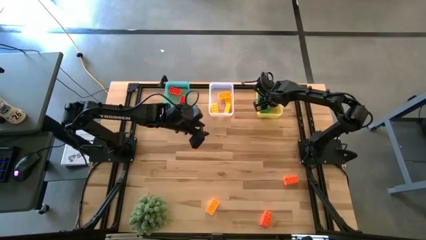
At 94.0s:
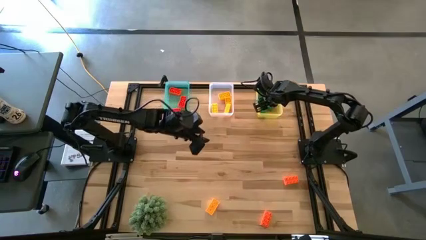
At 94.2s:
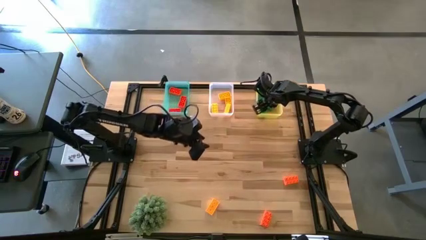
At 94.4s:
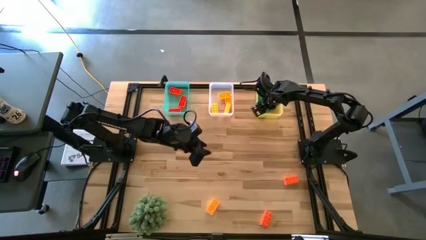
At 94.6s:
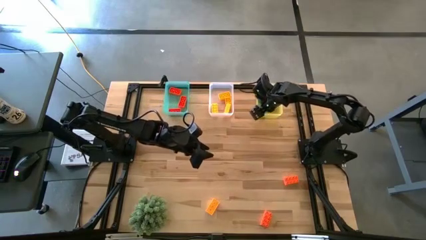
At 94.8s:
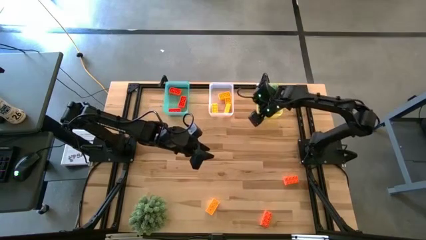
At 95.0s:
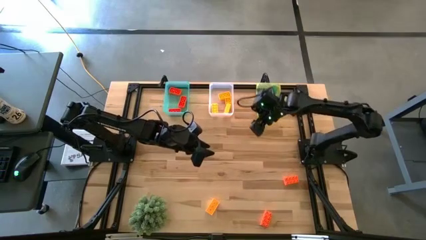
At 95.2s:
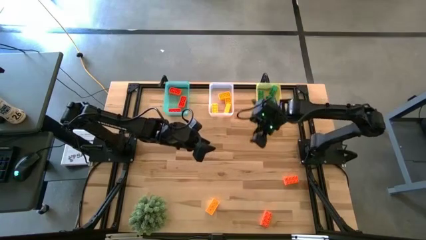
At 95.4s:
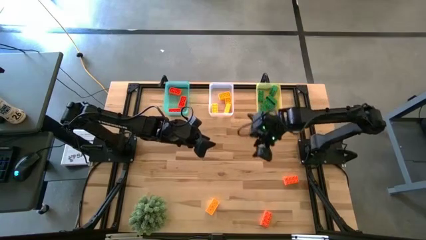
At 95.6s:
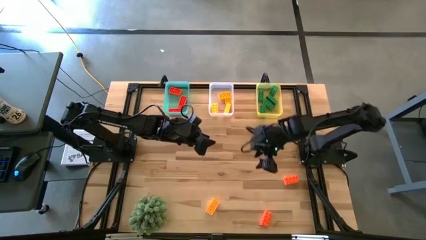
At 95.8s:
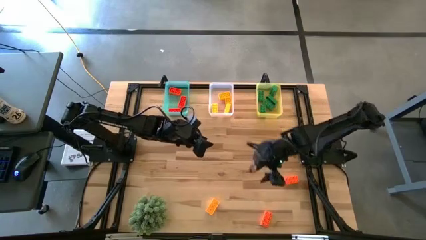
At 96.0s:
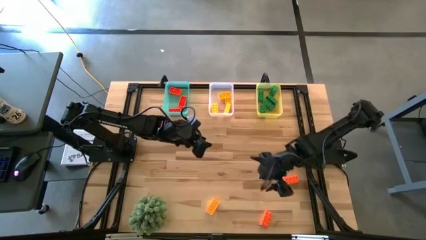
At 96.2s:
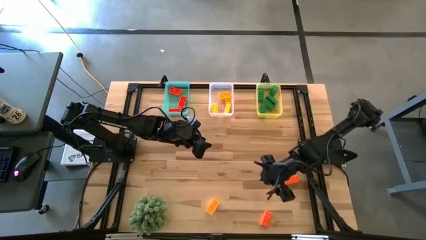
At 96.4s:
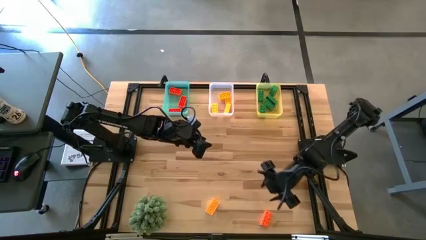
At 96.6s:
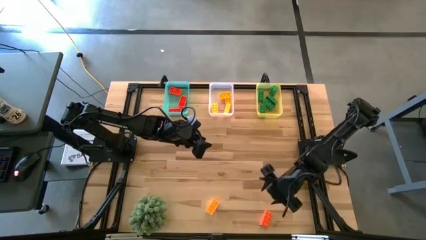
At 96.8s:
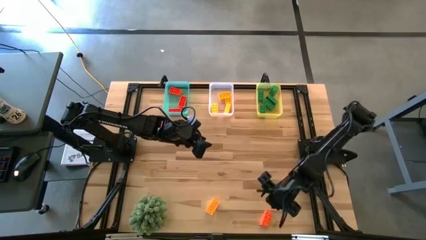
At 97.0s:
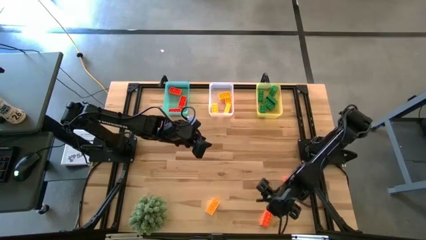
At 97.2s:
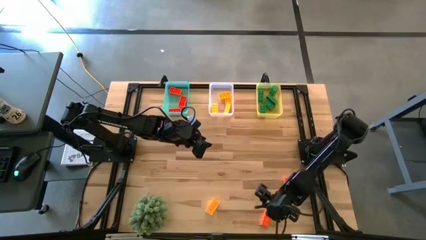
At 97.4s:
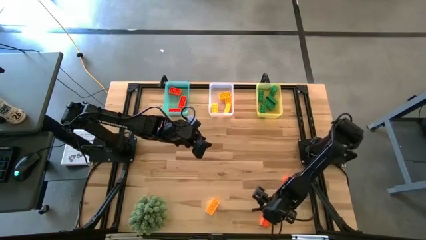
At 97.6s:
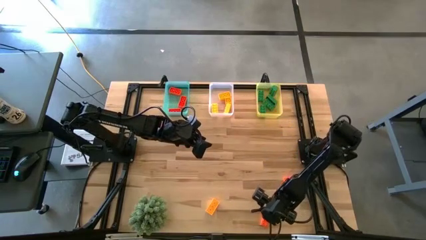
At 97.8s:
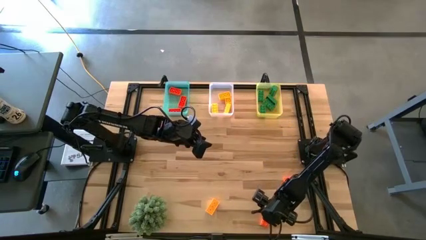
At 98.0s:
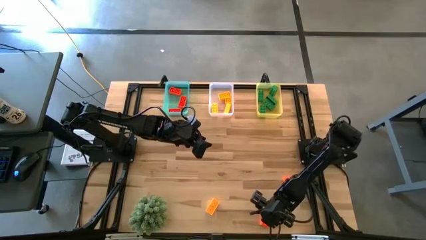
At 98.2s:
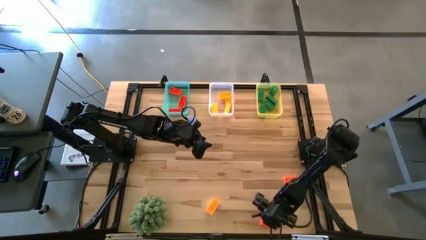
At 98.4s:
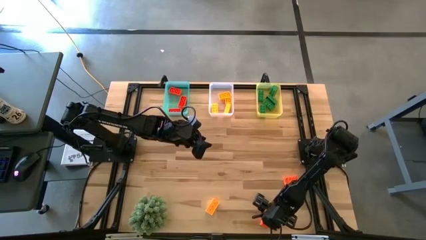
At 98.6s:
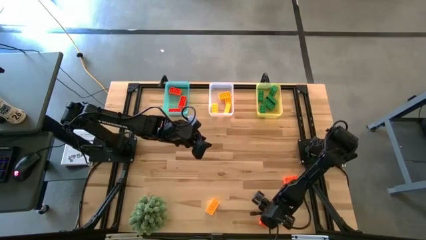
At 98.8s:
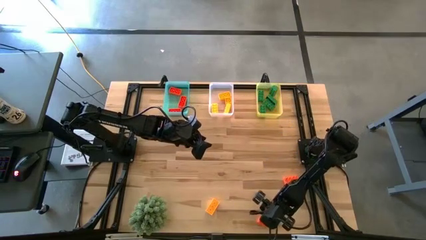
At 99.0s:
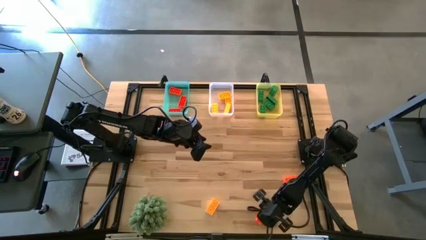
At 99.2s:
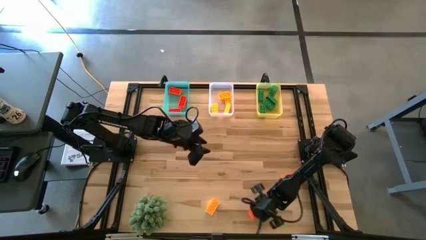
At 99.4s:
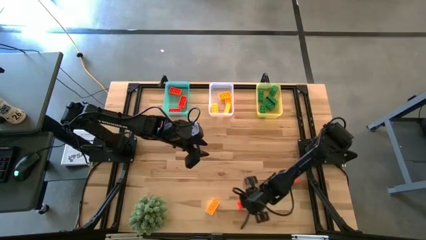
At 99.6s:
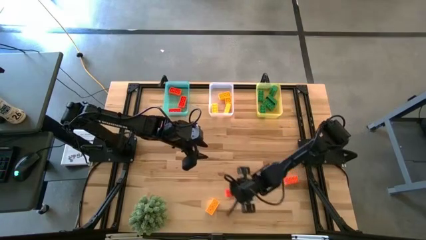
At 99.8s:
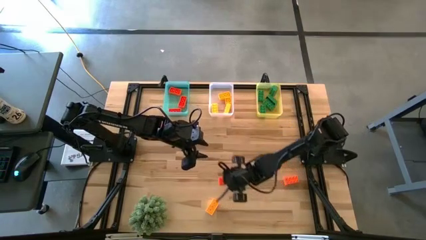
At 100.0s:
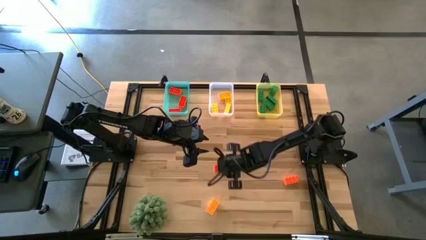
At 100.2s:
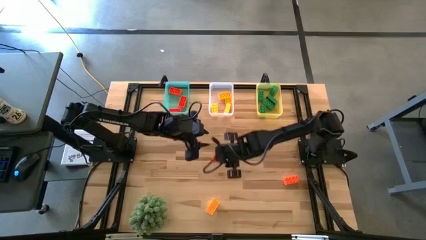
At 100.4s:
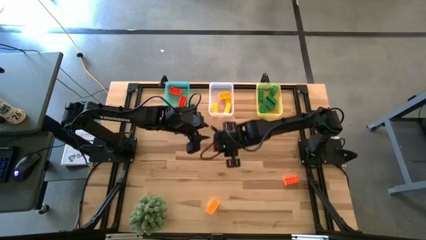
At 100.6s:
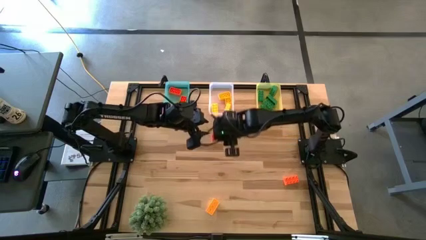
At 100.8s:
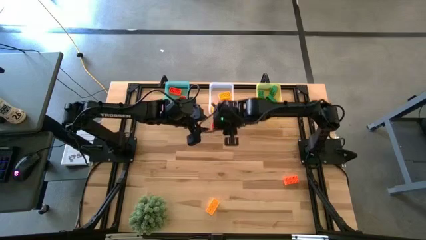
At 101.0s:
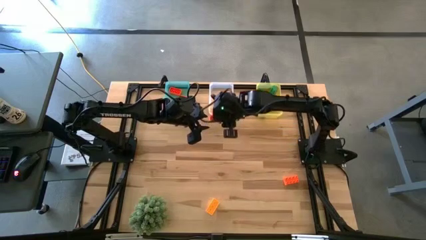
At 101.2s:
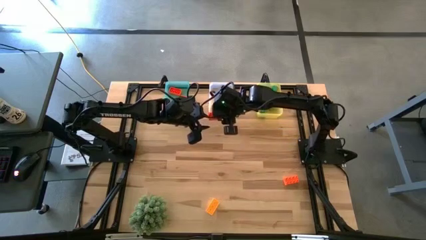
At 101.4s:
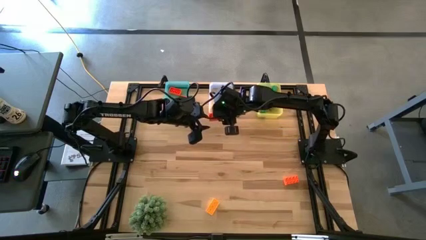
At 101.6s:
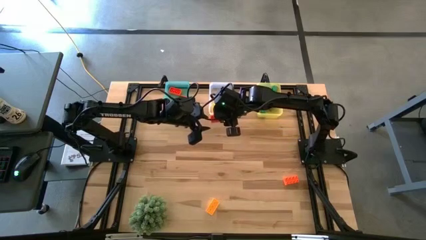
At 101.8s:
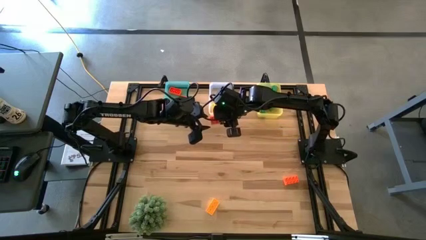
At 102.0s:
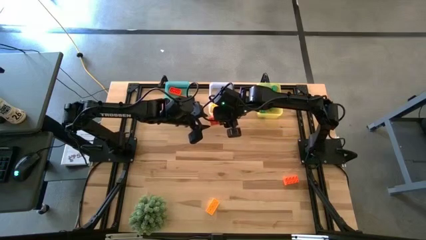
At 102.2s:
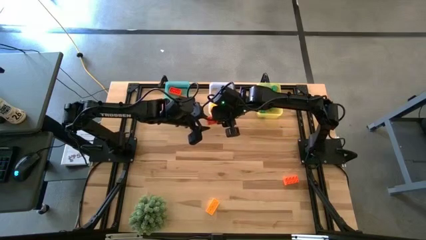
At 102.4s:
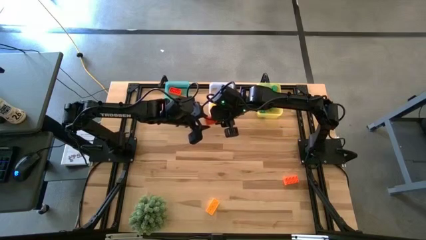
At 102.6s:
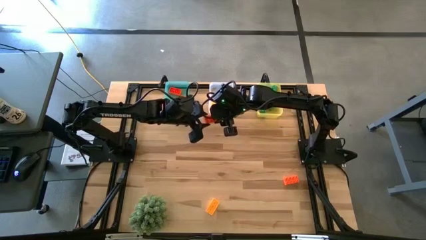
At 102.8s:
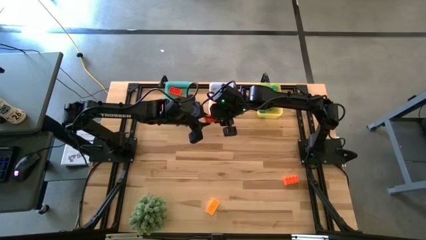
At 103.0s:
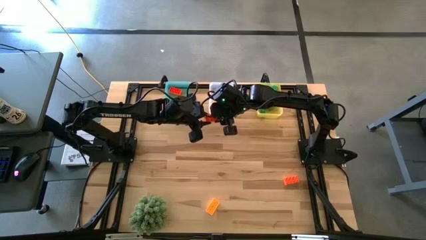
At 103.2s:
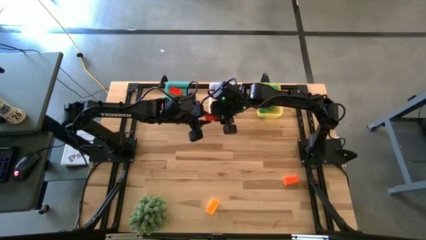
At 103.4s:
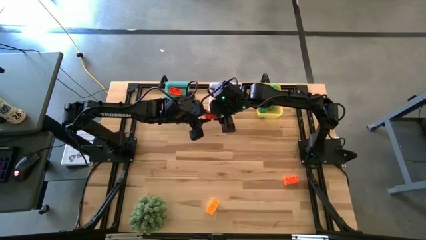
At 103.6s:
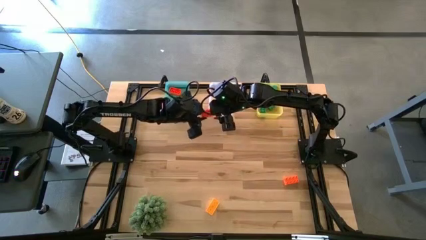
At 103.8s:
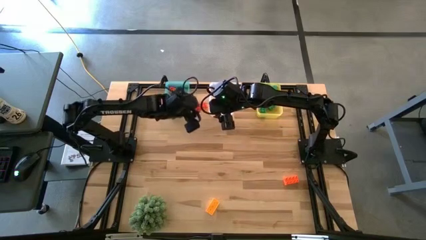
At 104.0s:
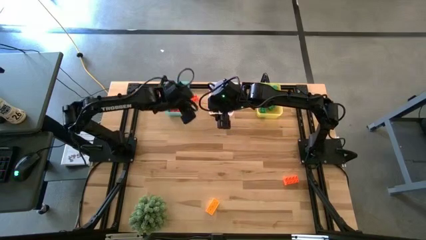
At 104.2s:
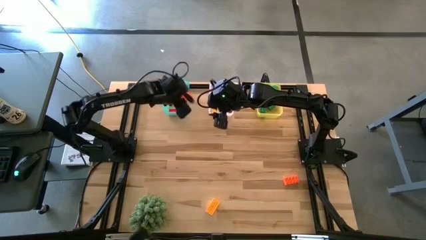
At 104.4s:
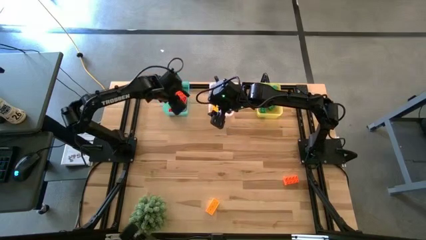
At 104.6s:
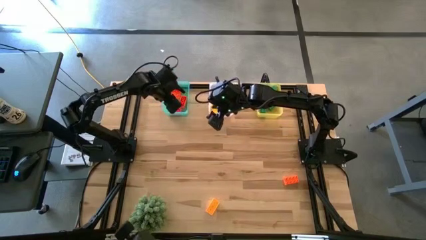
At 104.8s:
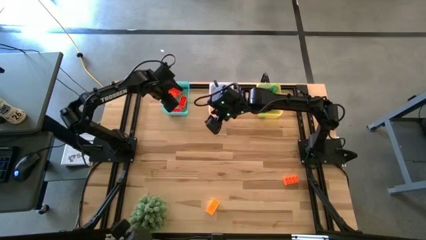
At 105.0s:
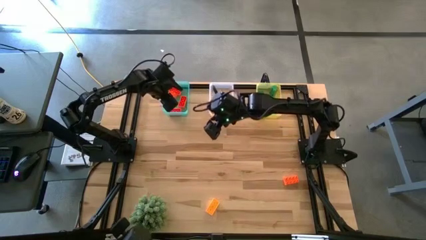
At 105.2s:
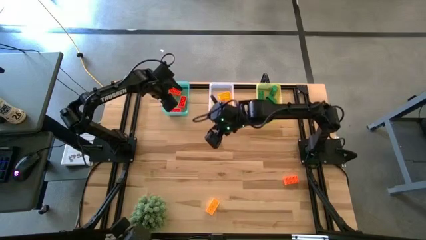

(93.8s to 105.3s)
Task: Sort & place blocks by color
Put the orange game piece into the blue bin

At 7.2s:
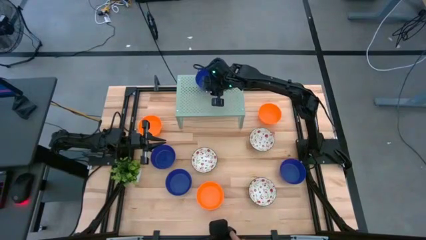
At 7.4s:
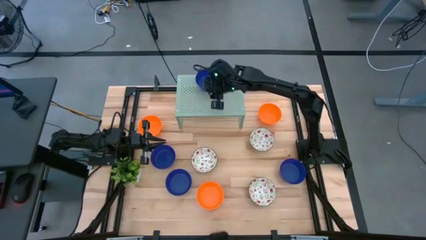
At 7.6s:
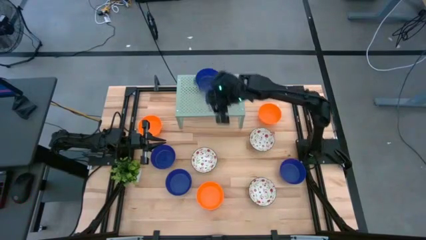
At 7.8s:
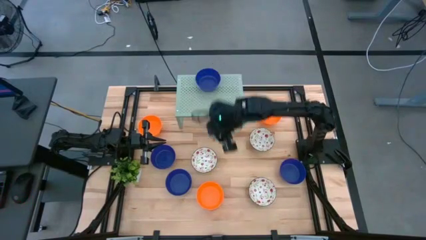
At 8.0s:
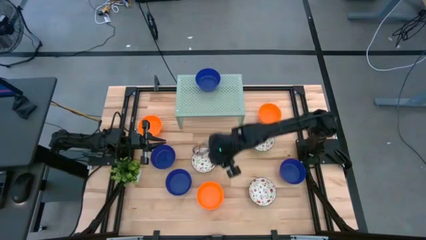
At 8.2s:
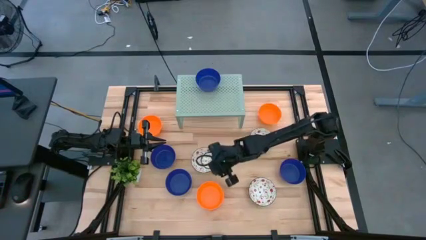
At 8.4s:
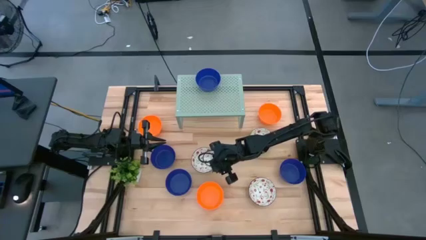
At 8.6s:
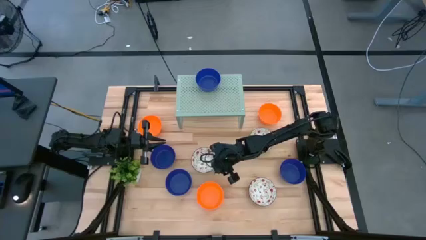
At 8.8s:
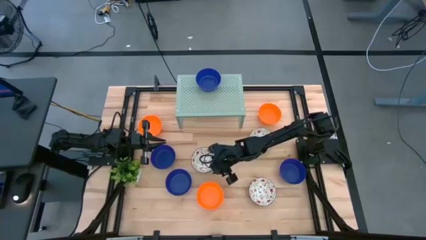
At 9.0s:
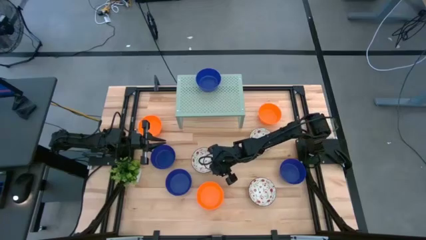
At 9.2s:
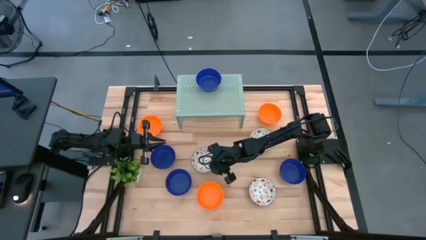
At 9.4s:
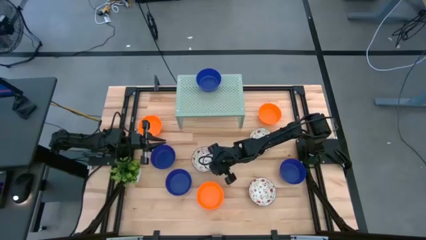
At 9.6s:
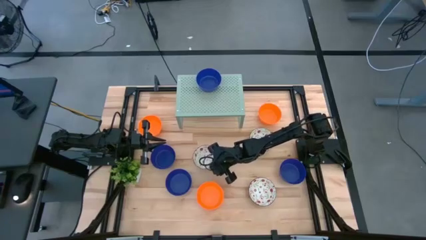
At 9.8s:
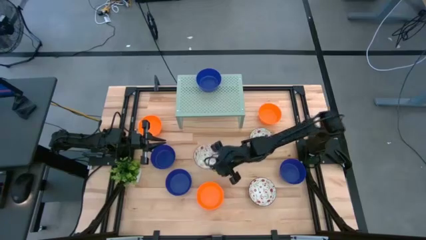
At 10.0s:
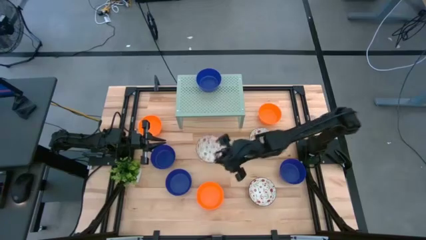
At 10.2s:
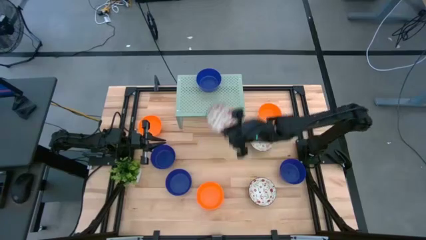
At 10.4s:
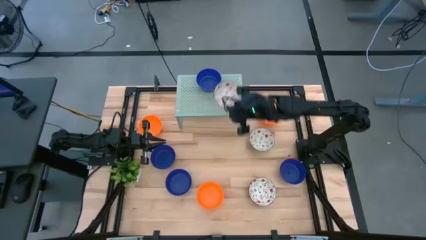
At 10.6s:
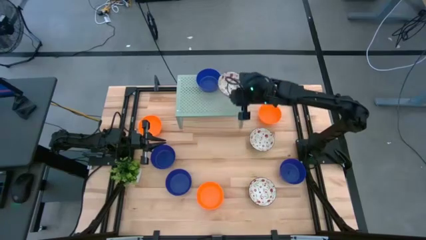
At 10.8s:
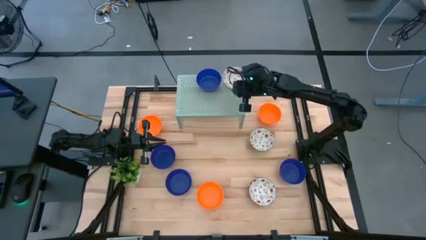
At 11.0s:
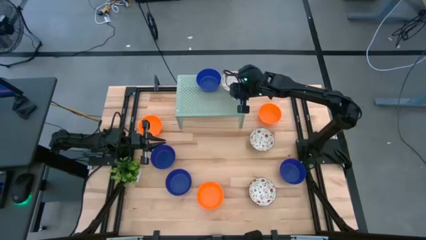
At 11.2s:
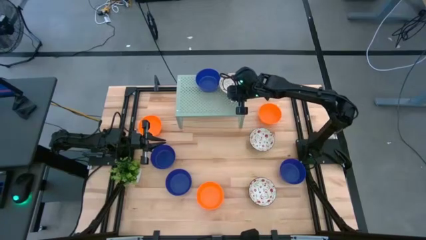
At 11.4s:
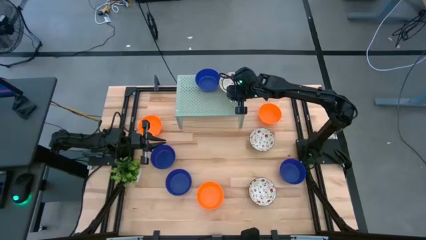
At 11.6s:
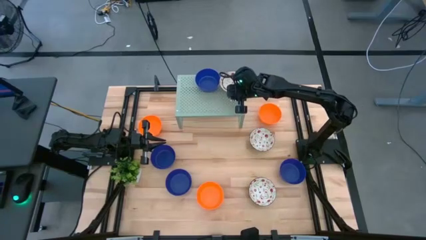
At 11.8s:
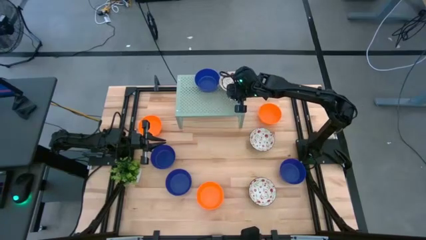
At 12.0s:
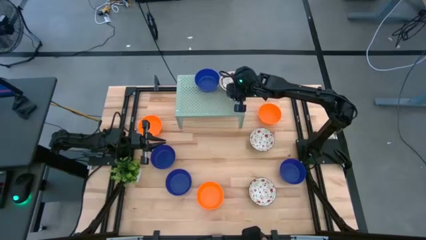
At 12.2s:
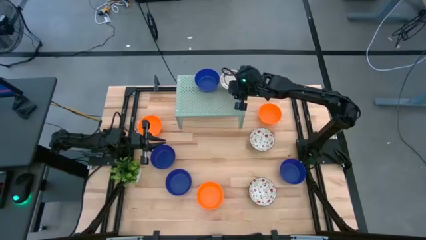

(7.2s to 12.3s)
Task: Pick & Place Mini bowls
Put the white bowl on the shelf
